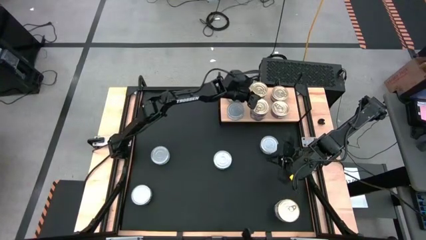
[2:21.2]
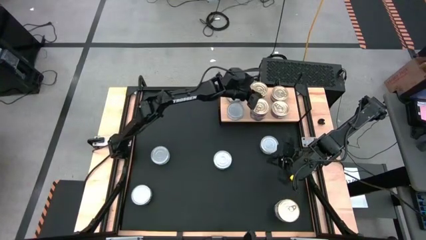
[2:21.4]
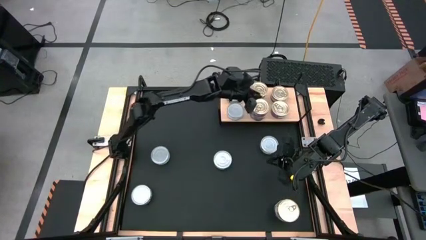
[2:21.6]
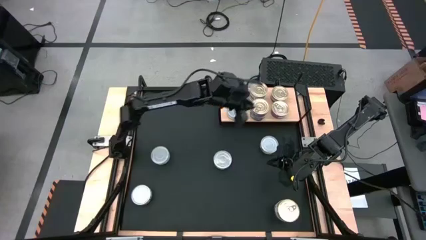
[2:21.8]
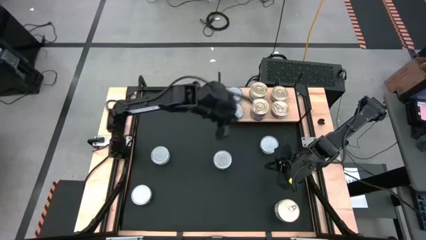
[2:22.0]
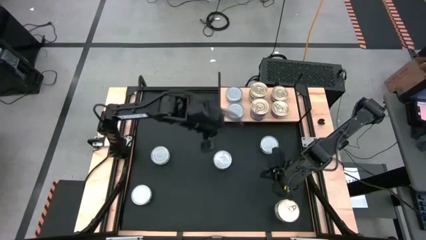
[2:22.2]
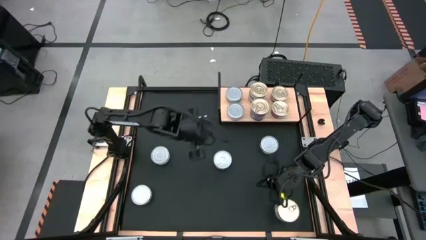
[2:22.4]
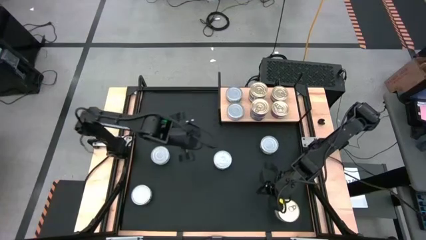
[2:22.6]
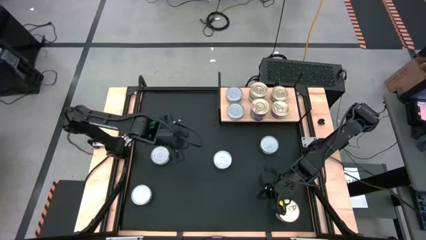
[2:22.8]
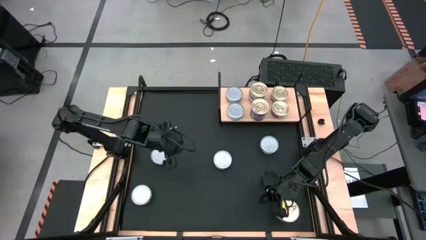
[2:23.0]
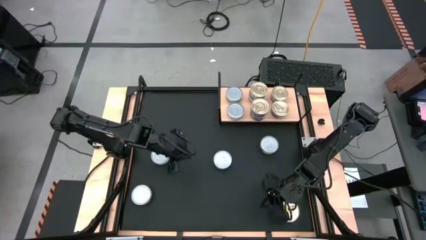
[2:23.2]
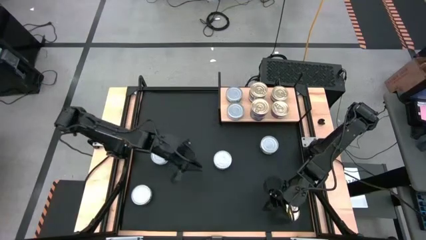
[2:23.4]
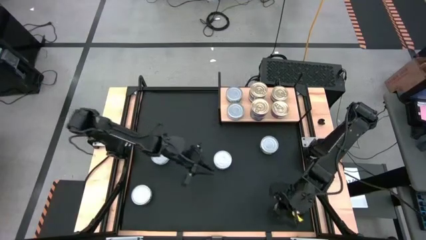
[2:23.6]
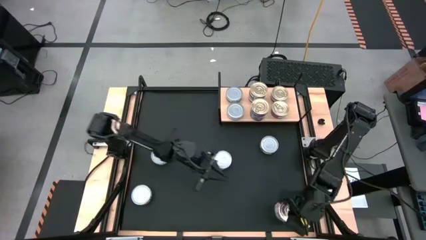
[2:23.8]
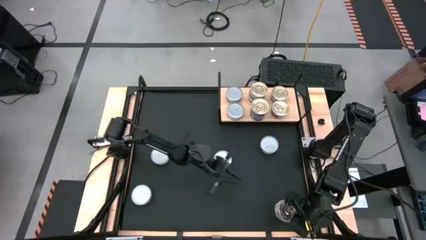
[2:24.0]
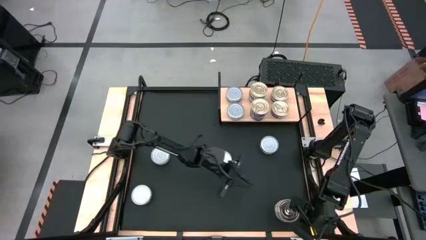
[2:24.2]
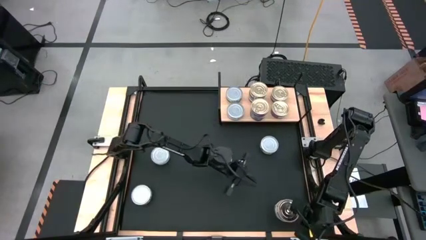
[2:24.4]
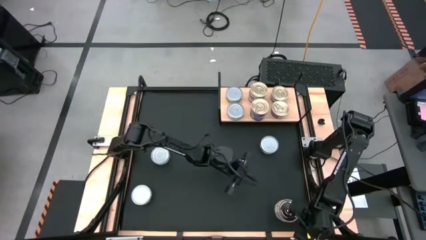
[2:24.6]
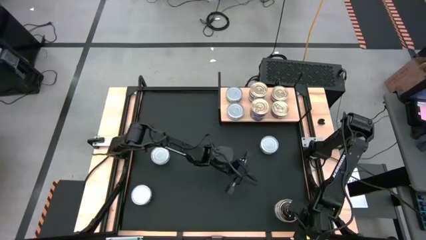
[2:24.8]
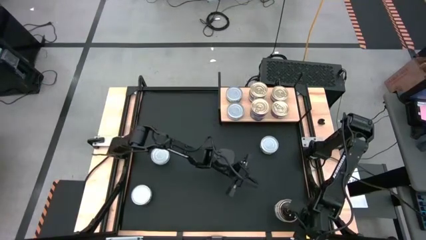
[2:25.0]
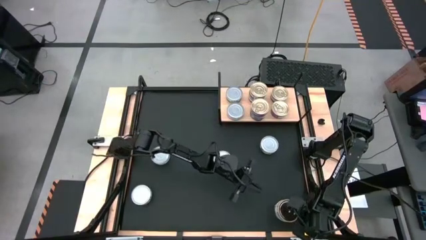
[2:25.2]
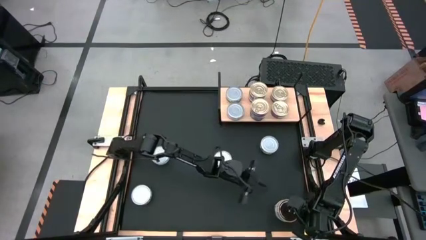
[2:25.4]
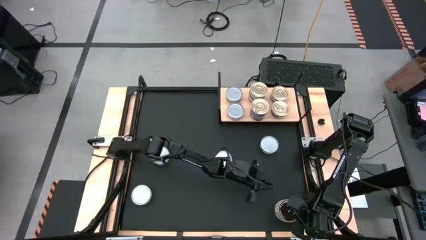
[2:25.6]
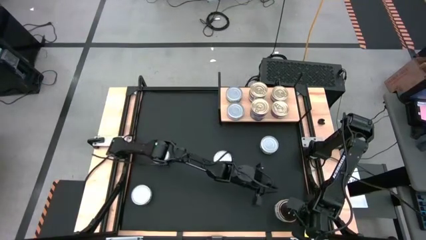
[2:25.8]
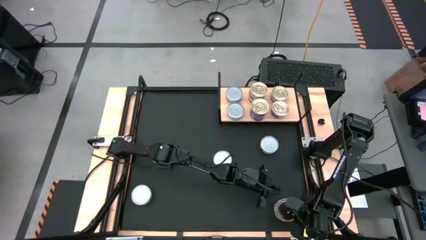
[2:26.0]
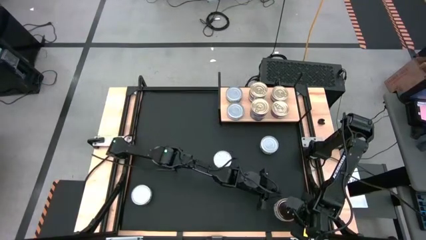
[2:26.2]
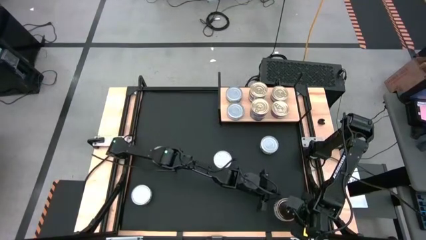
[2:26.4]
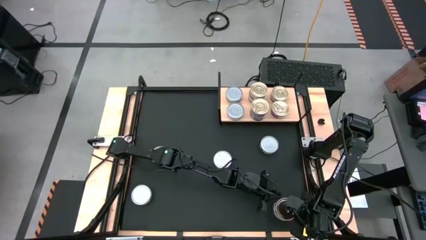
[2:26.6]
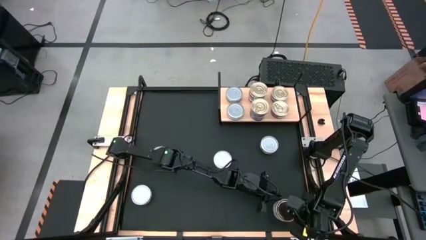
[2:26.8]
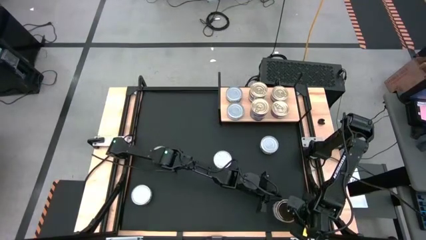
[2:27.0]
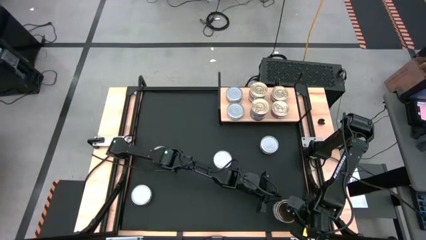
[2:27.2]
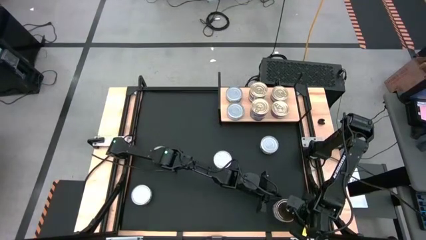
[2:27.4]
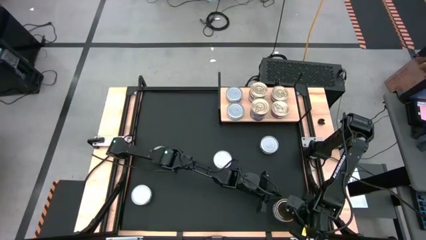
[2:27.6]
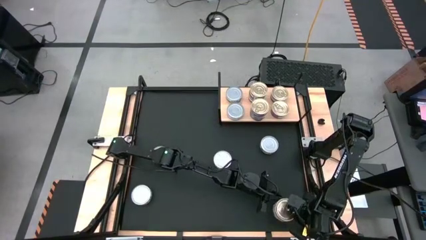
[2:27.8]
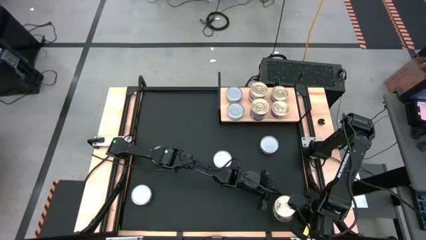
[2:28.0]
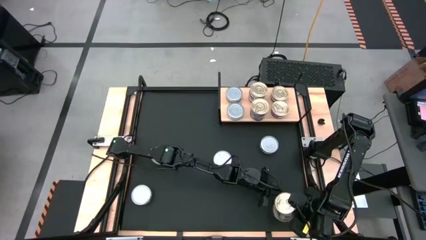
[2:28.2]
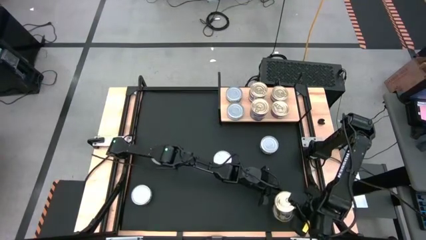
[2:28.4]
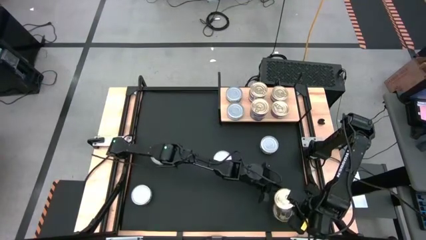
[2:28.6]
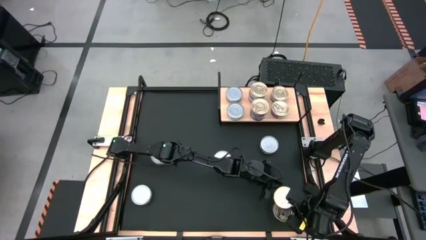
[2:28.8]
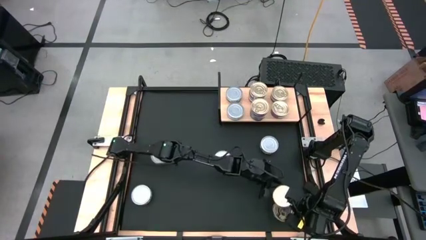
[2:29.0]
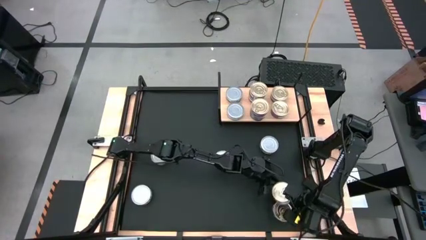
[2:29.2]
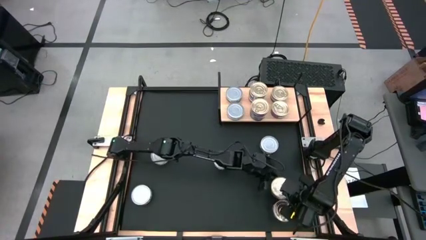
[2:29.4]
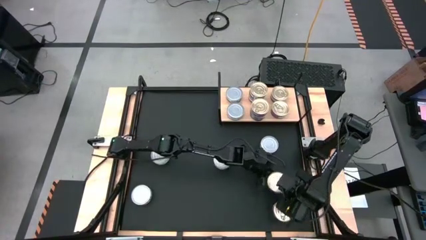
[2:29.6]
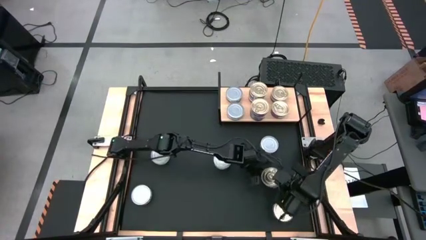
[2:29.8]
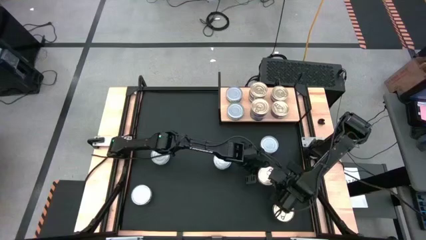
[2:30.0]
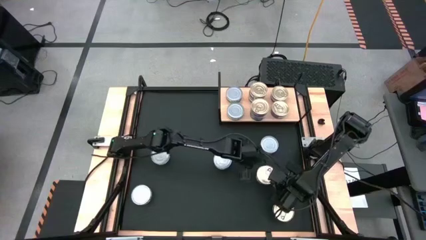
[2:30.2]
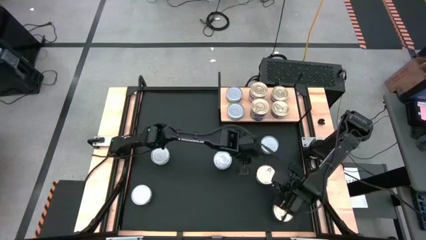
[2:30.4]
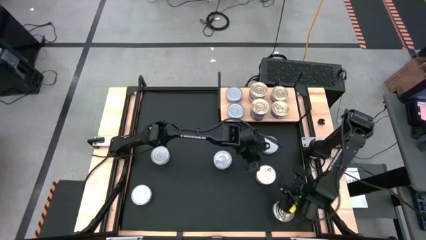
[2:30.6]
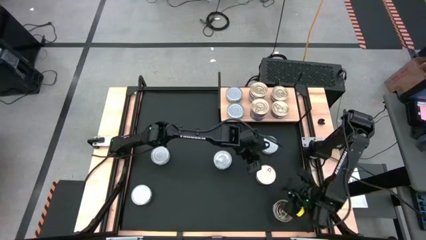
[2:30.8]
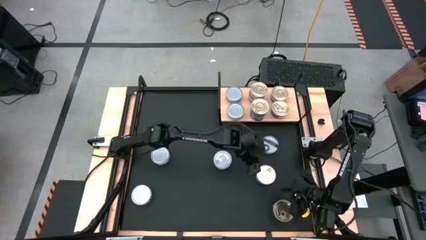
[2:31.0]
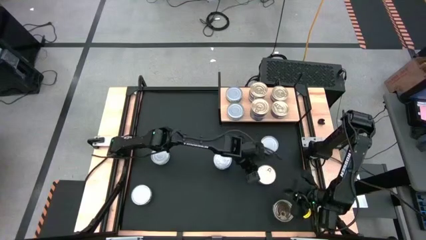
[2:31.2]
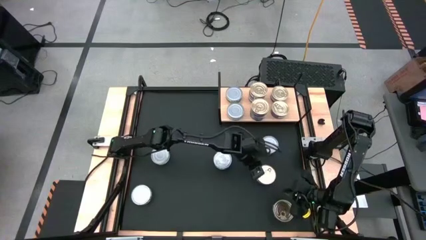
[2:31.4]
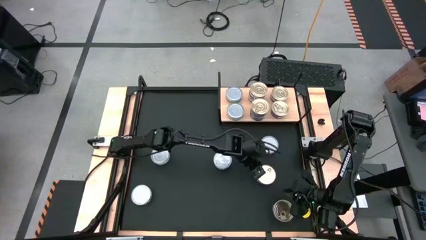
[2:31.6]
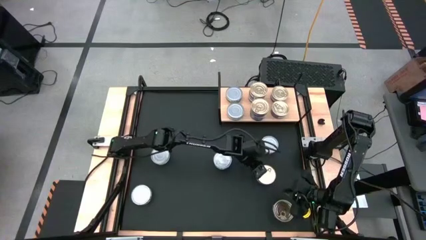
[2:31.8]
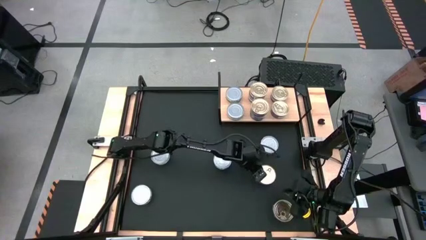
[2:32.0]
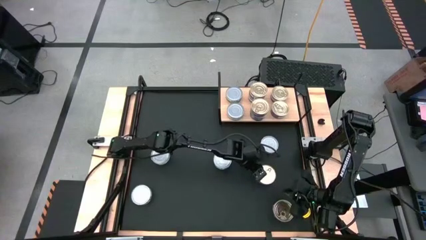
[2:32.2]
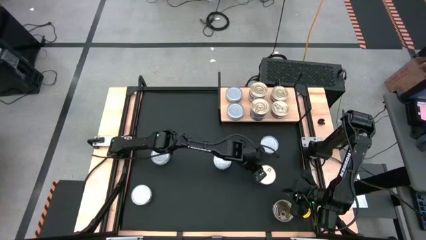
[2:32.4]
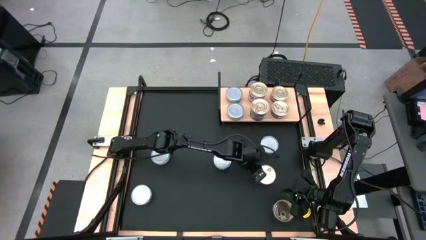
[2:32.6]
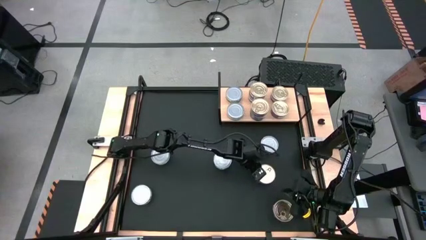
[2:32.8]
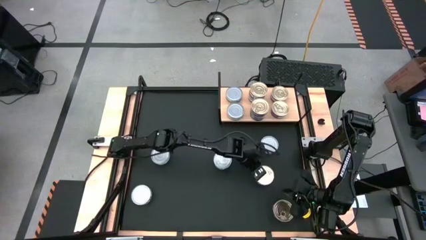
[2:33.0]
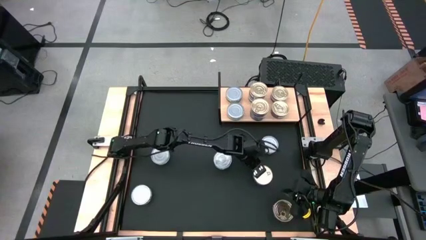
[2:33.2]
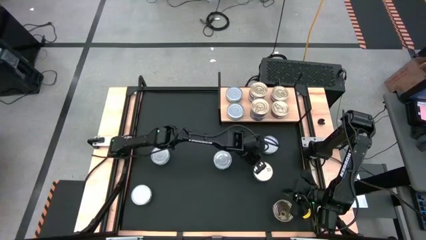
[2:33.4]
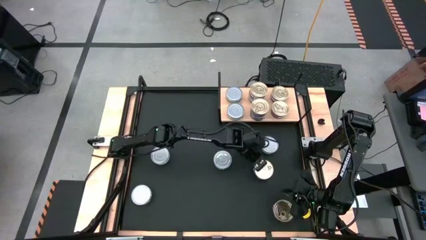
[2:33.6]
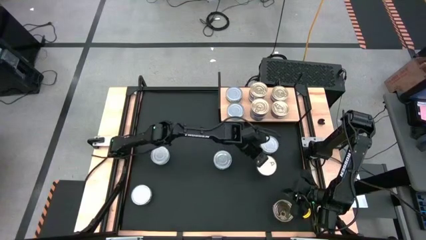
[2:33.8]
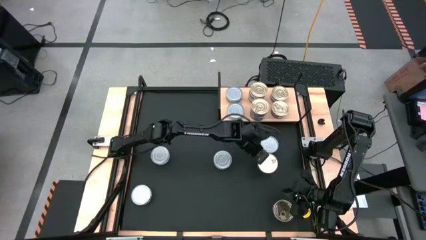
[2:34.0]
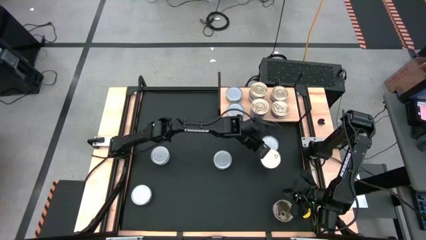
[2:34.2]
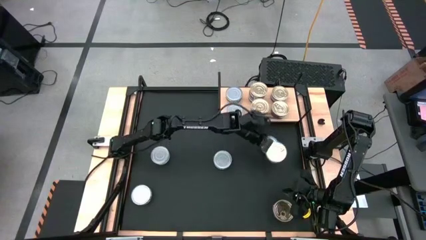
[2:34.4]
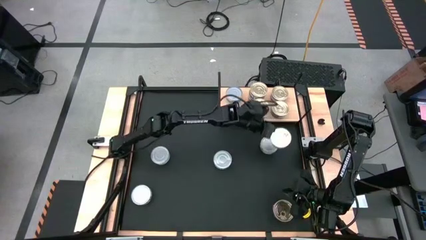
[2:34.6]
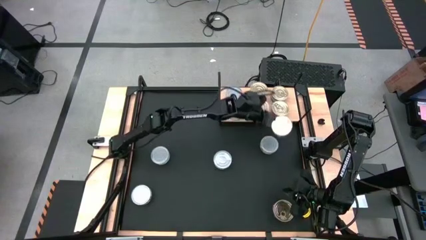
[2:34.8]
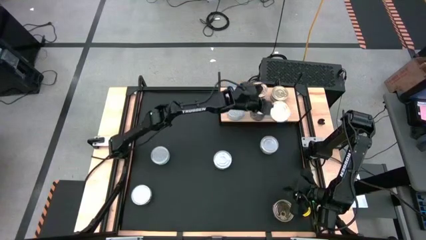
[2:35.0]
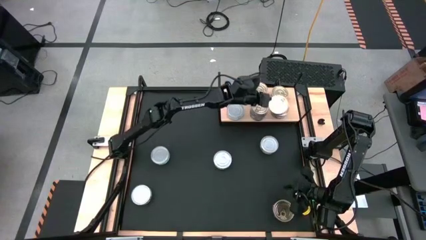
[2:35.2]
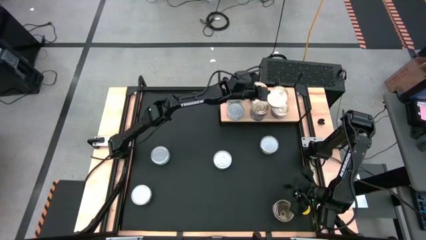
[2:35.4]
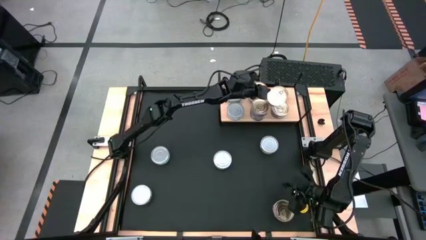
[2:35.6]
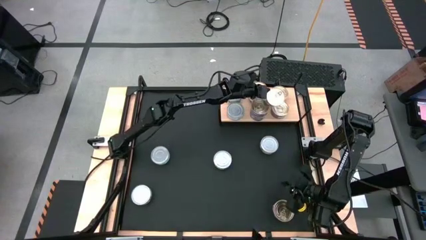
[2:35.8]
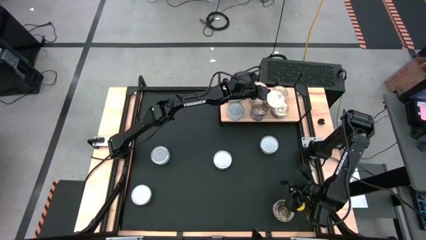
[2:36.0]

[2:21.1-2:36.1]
Task: Stack canned seafood by type on shelf
Stack the blue pink tuna can on top of the other blue pink tuna can on the shelf

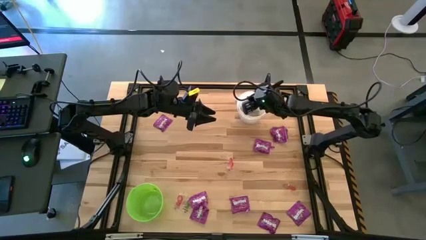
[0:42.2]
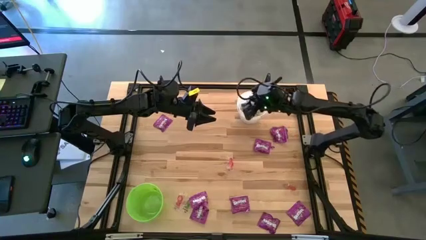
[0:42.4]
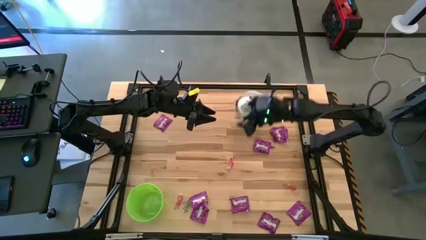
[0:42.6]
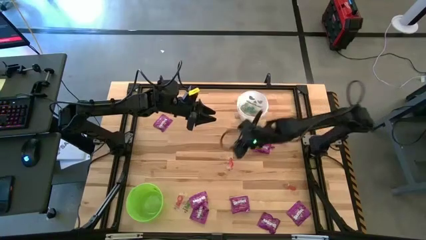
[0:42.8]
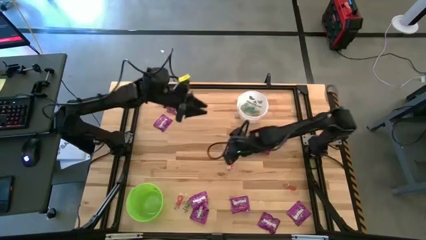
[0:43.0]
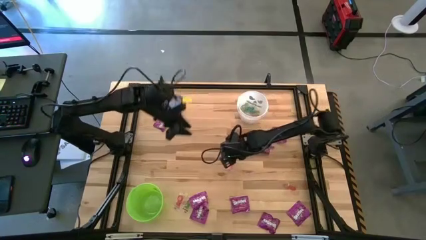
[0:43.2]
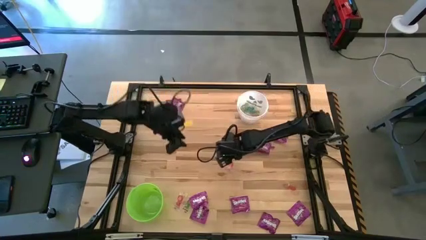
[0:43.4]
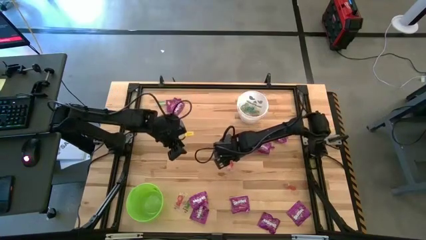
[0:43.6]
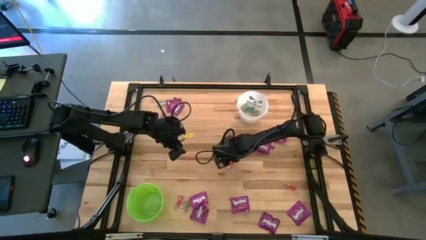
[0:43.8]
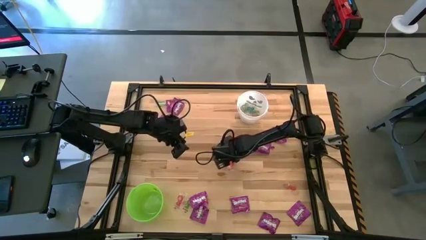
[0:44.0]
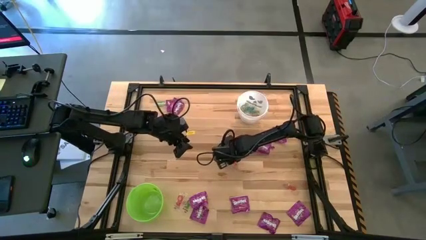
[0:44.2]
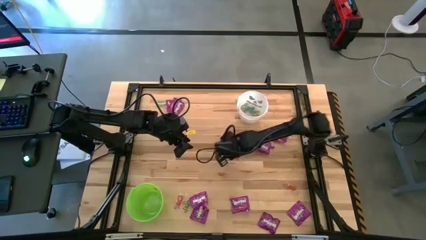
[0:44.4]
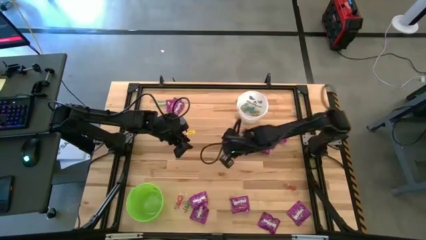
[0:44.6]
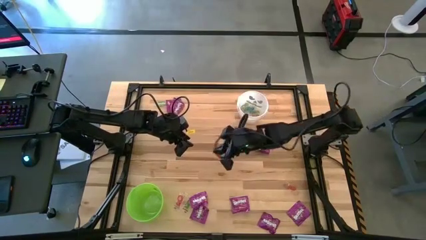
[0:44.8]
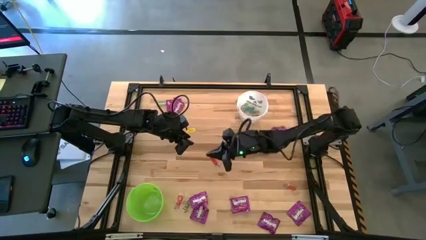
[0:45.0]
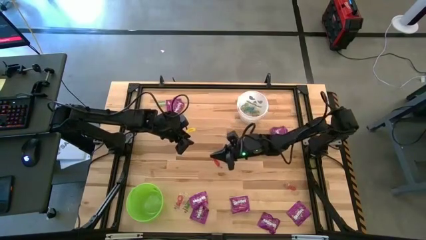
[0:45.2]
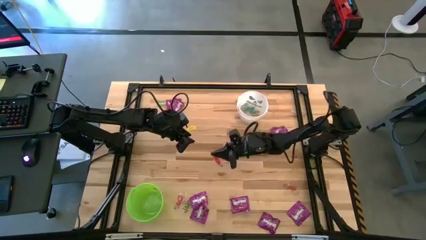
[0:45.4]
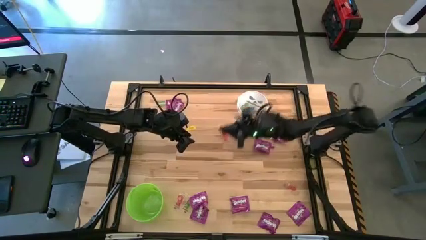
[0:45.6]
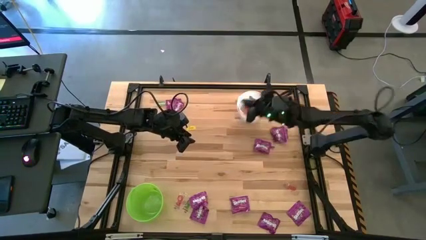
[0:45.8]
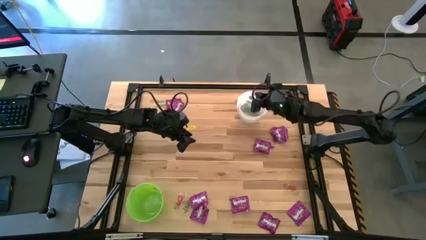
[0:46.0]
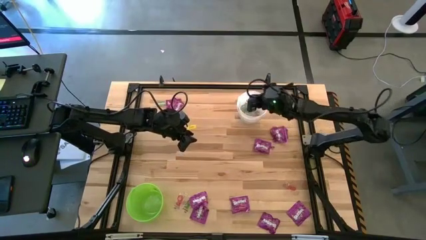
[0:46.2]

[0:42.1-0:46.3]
Task: Sort candy by brand, put in halloween buckets
Put the red gummy into the white bucket
